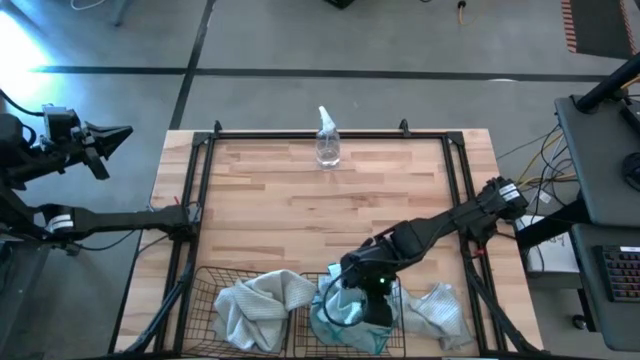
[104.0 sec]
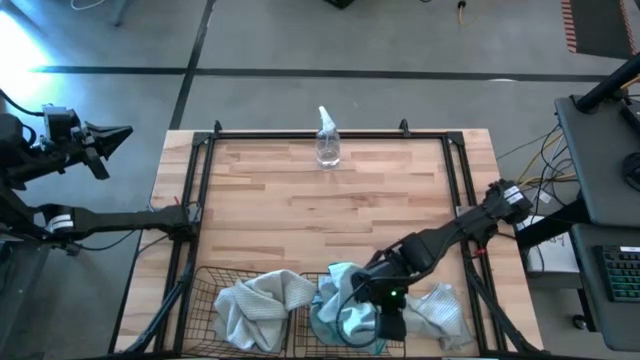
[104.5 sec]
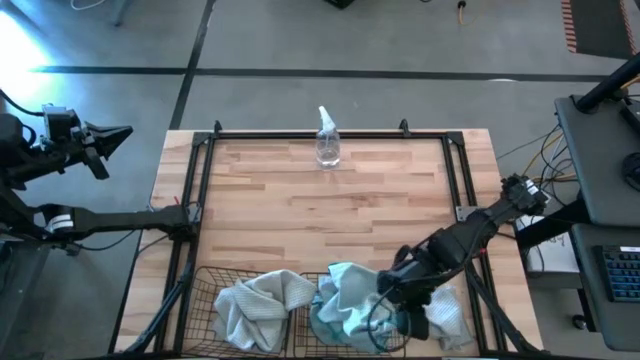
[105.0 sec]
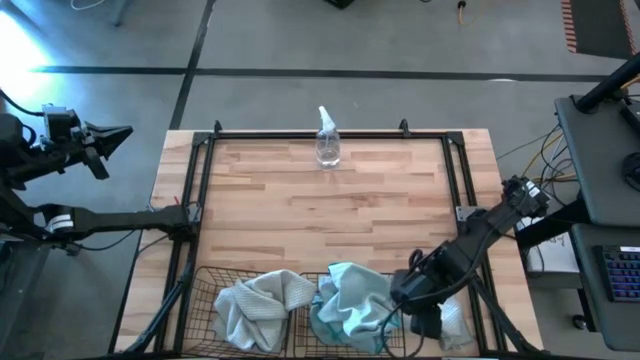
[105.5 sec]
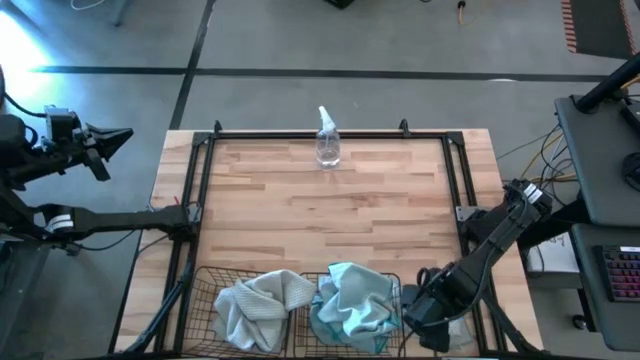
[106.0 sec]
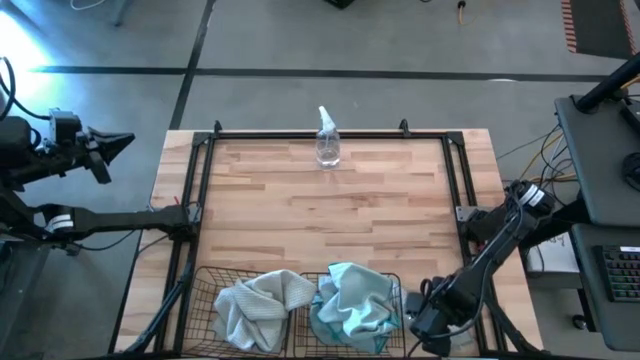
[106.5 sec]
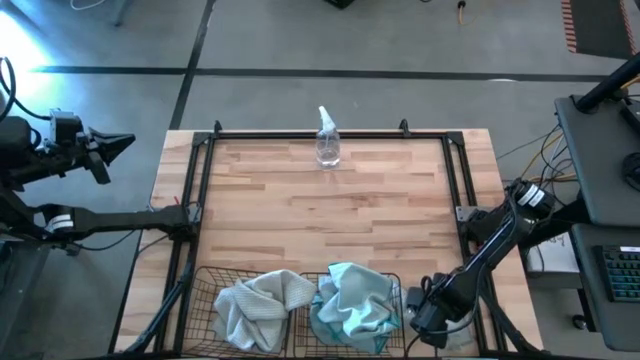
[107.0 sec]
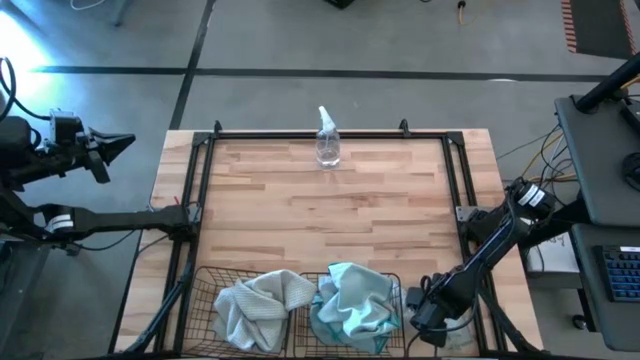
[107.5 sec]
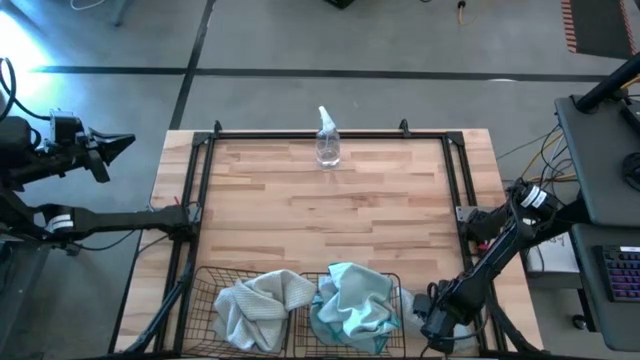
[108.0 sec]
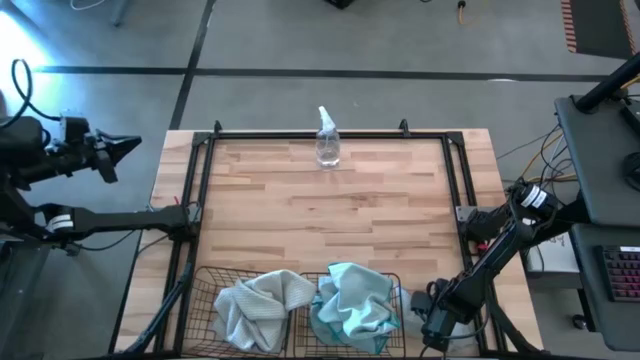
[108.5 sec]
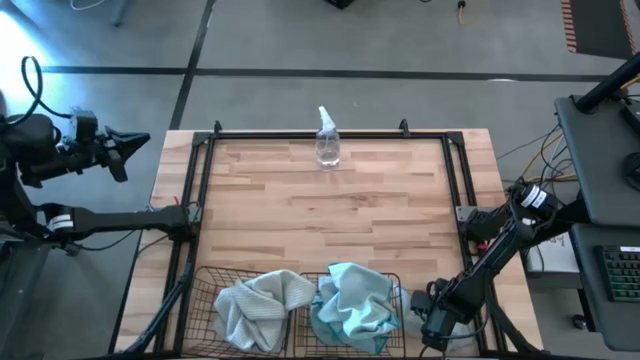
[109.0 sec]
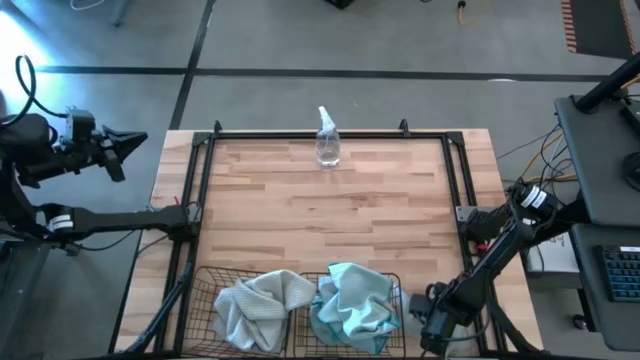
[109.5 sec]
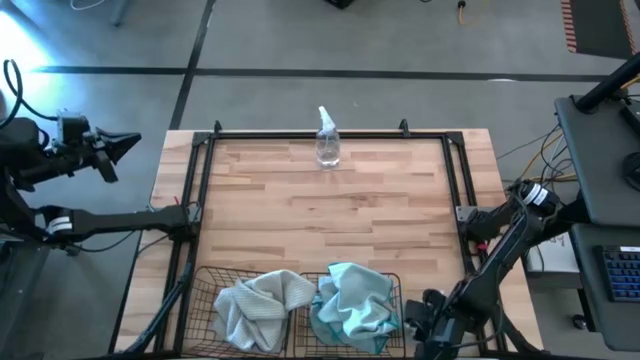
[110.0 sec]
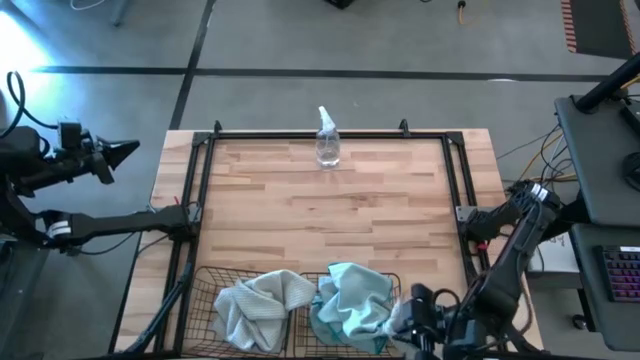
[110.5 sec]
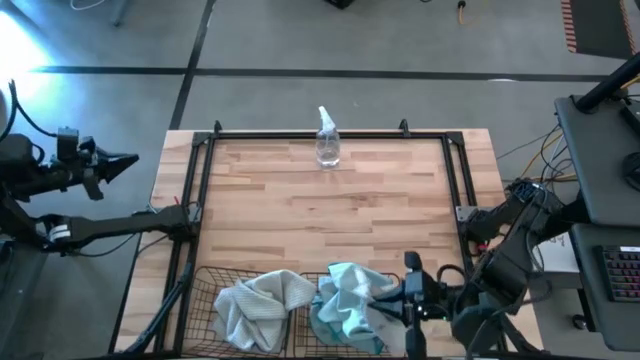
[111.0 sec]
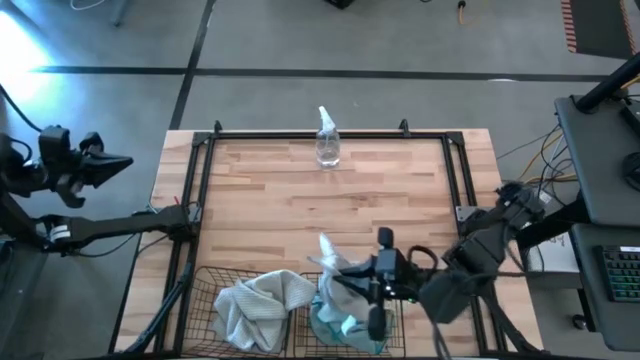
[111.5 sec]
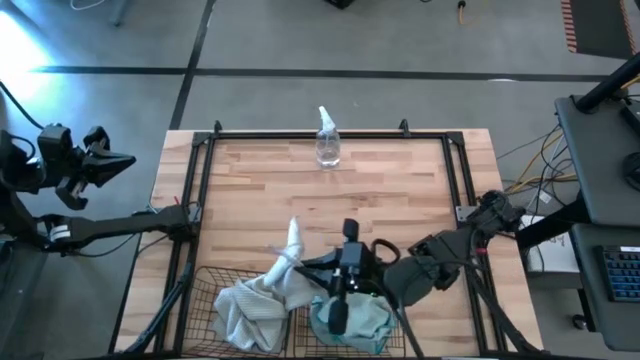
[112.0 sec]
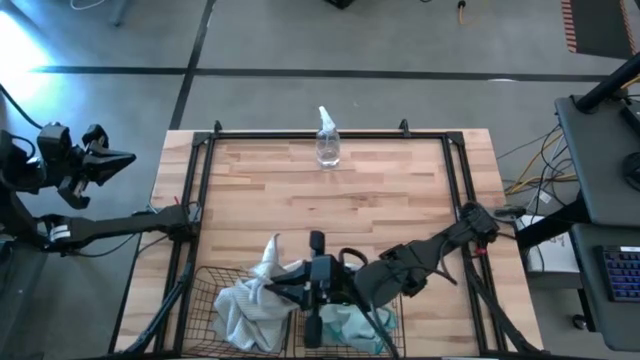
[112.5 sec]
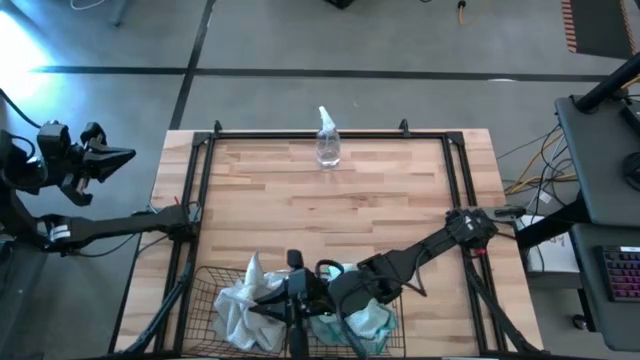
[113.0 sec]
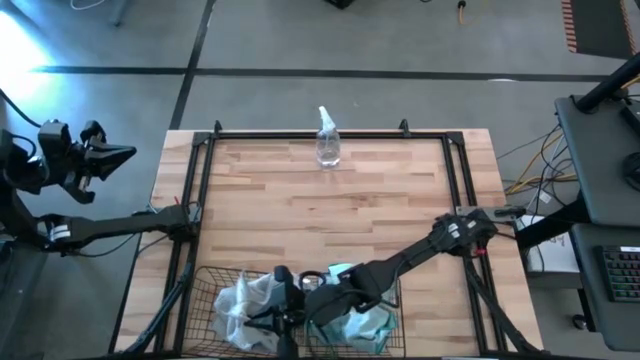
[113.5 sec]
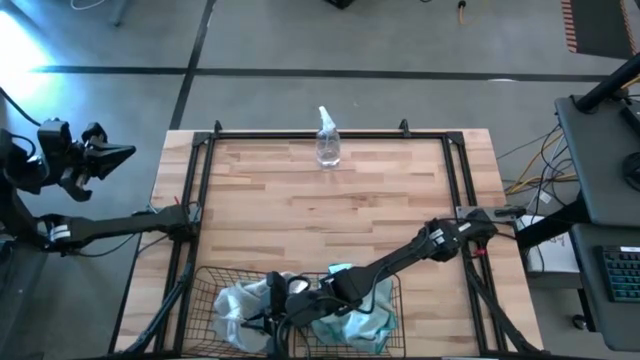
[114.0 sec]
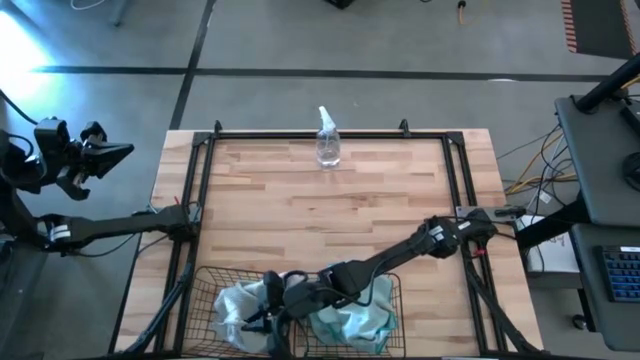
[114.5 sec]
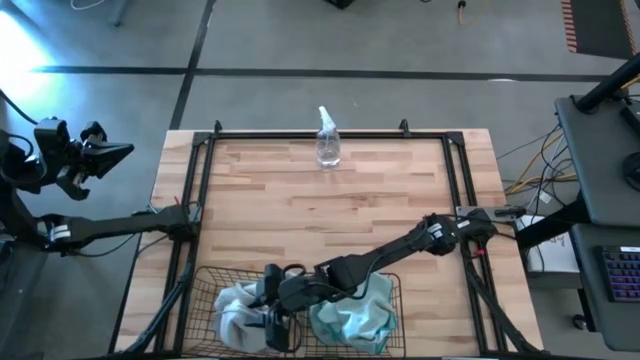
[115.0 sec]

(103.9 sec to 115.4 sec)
Task: Sort microfiber towel by color & place in baskets
Put the gray microfiber towel into the left black wire basket

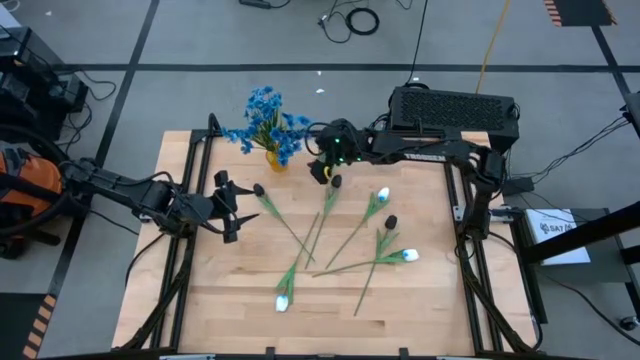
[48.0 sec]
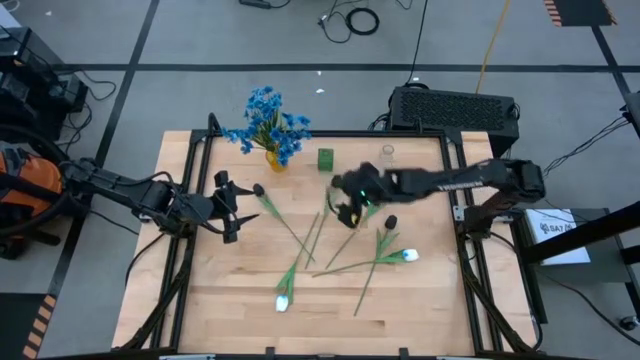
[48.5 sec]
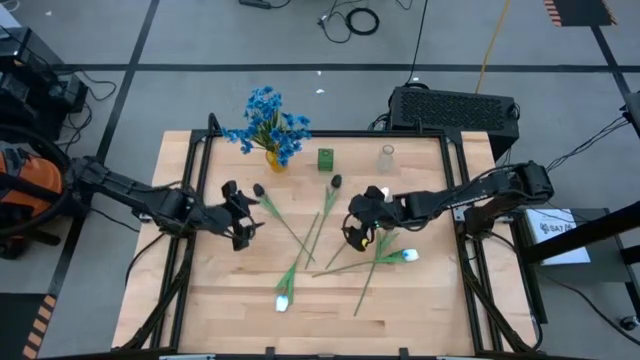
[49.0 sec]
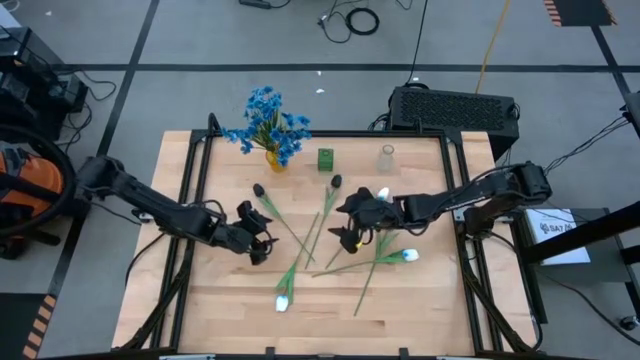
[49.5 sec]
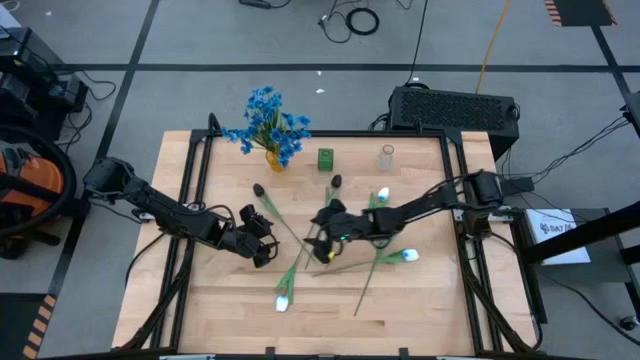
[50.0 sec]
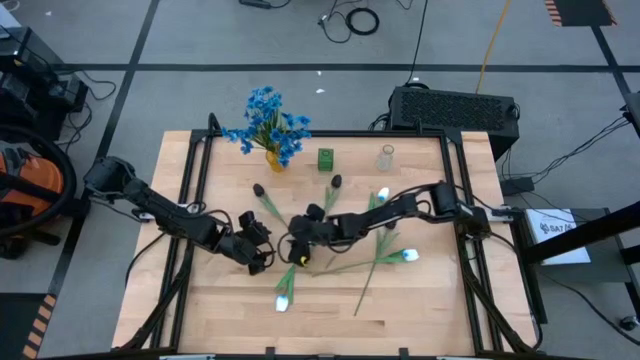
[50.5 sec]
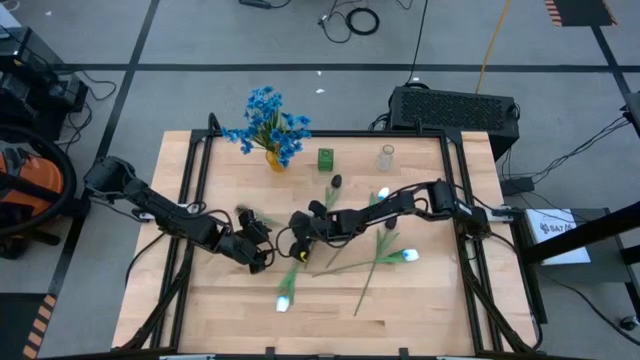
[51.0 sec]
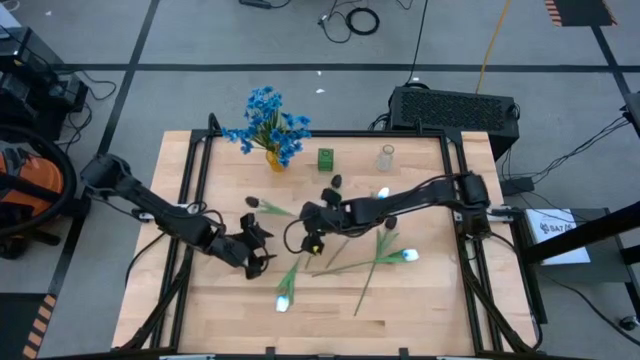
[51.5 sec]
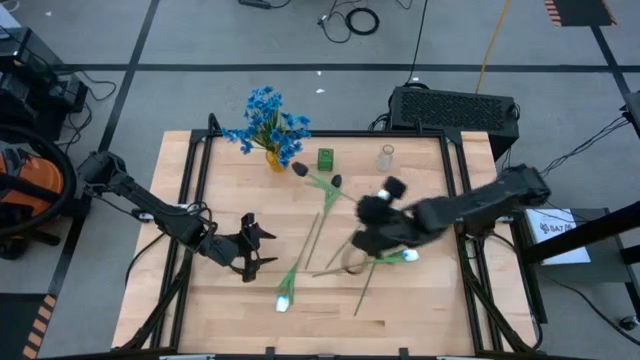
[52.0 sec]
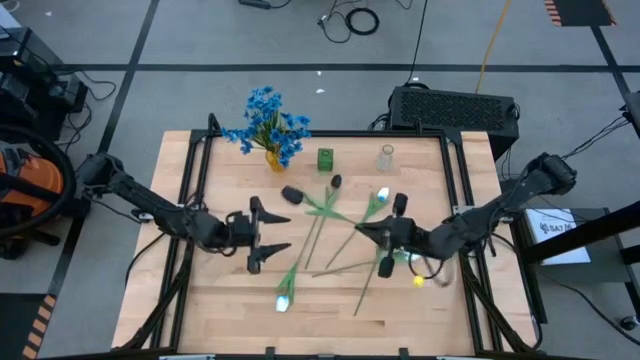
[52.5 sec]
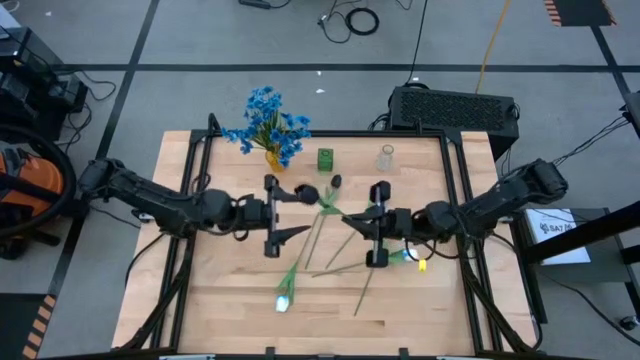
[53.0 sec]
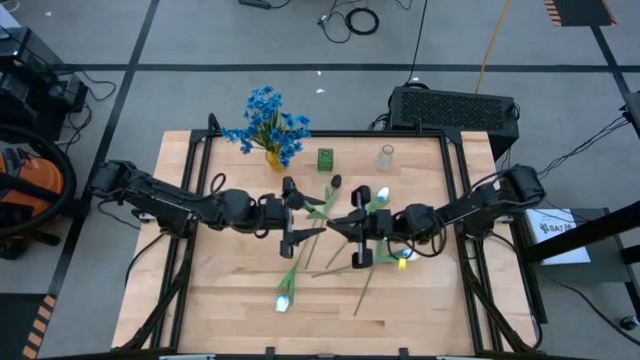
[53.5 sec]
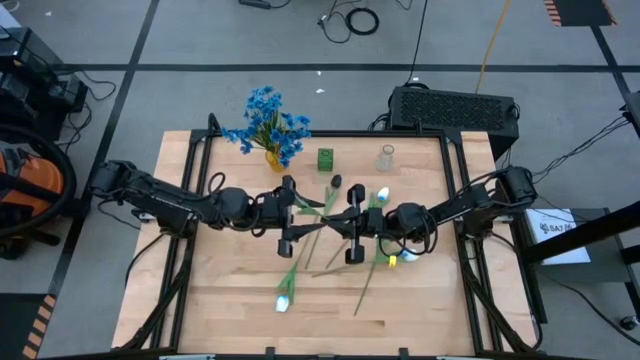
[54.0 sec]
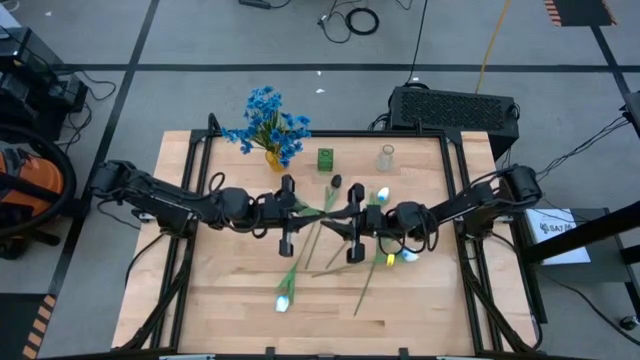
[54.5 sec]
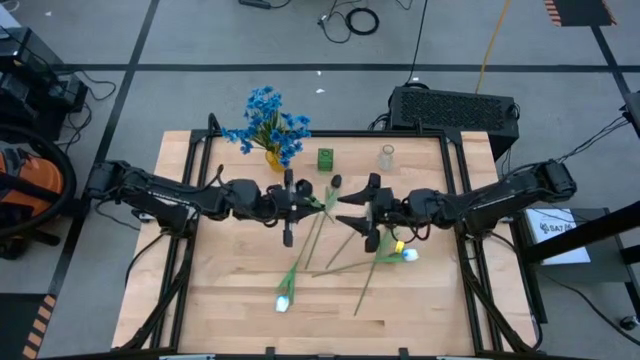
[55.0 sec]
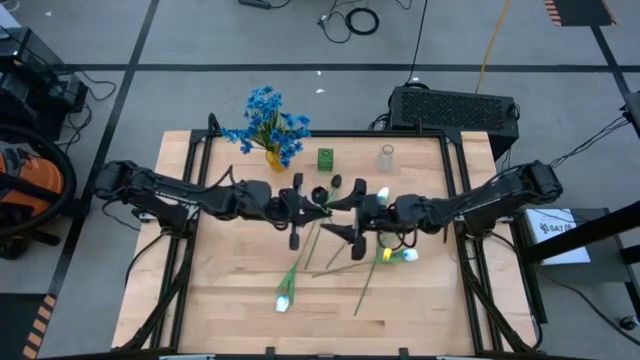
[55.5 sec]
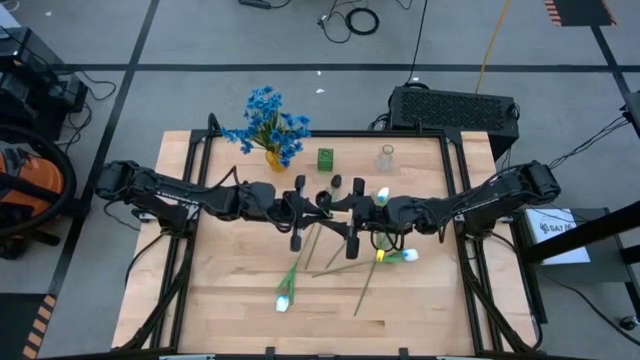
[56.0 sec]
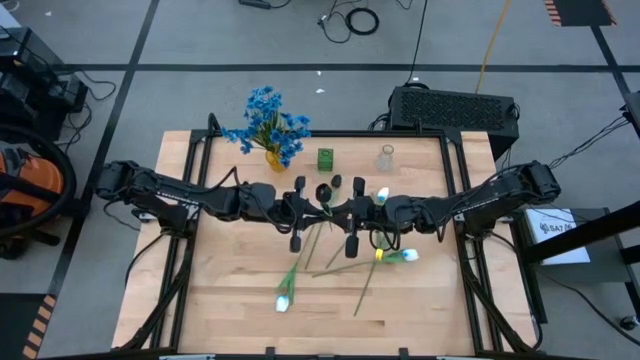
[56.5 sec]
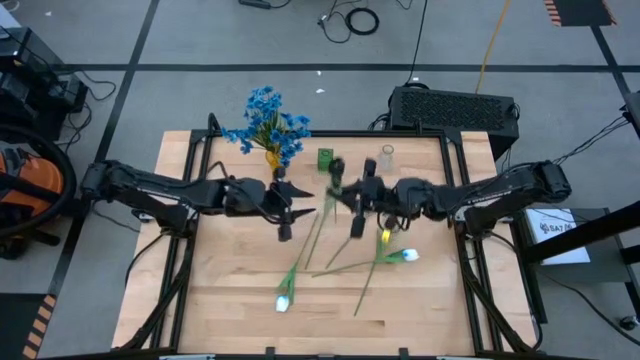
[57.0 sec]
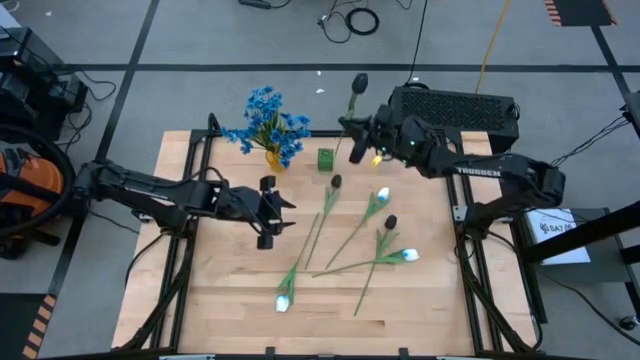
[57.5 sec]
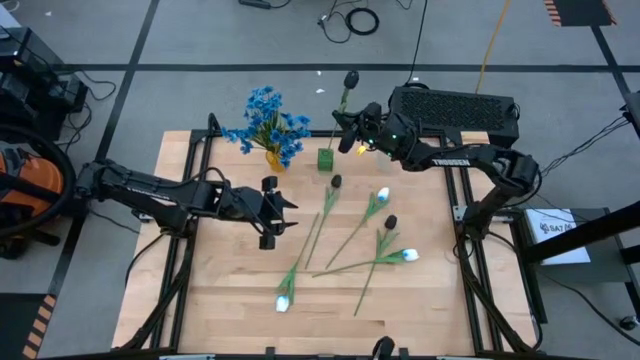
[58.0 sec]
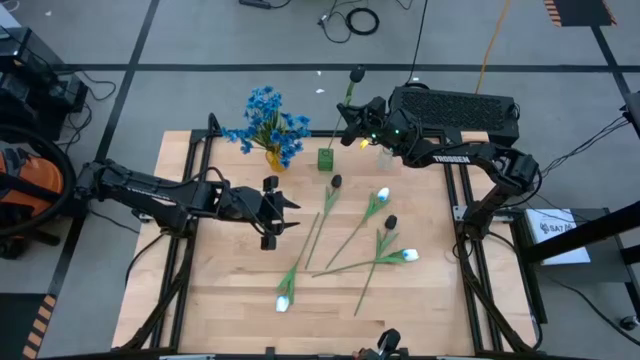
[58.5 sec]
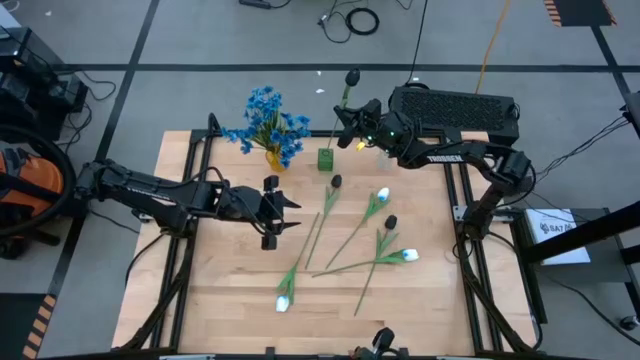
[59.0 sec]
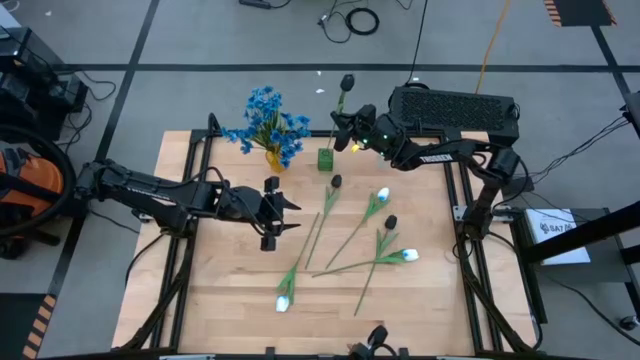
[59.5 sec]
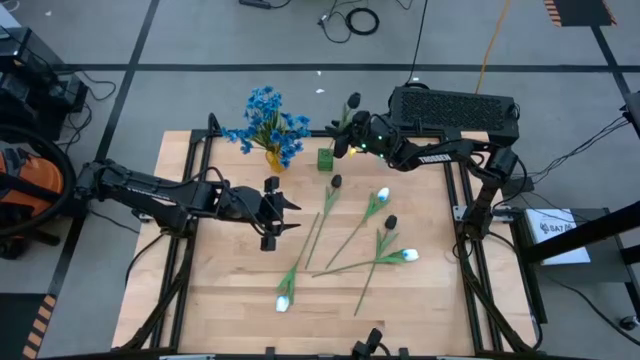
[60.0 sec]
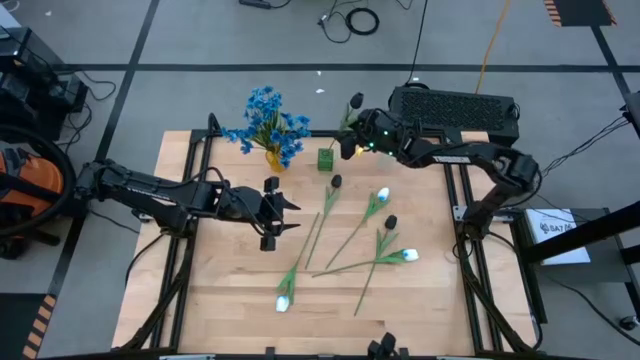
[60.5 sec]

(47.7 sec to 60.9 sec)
Task: Sort flowers into vase by color
Put the top left black tulip into the green vase
